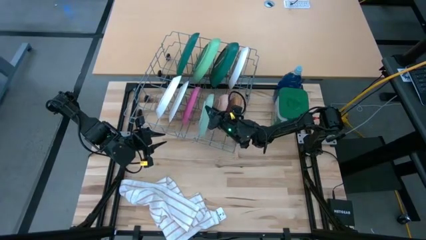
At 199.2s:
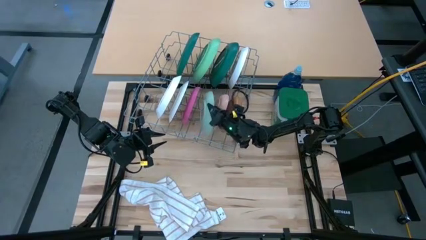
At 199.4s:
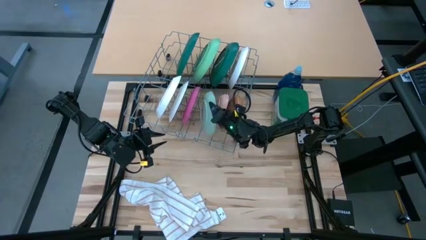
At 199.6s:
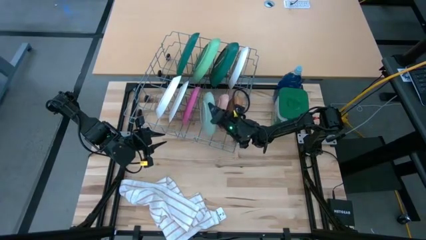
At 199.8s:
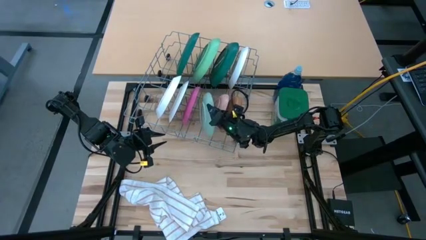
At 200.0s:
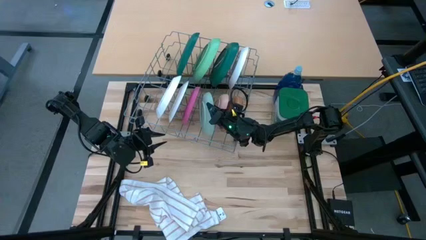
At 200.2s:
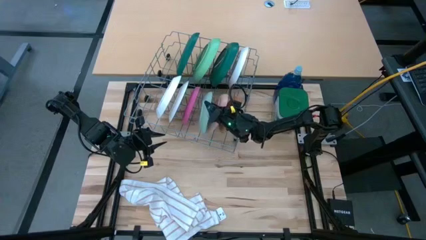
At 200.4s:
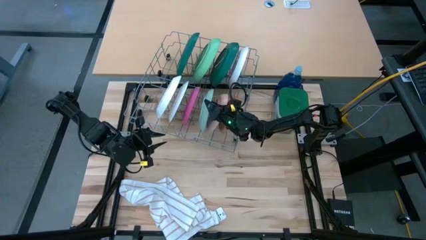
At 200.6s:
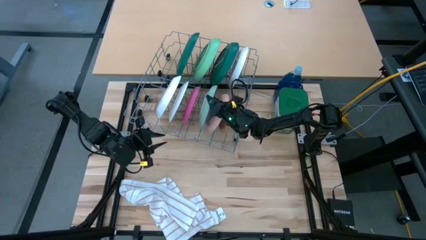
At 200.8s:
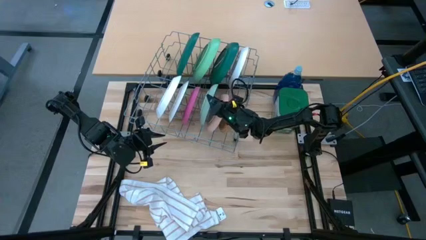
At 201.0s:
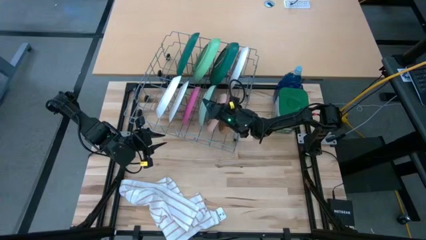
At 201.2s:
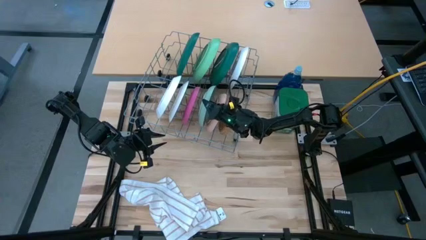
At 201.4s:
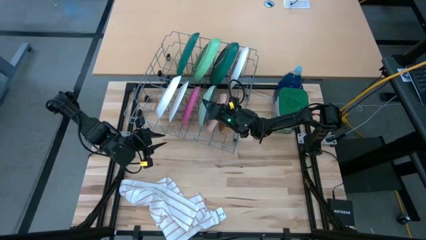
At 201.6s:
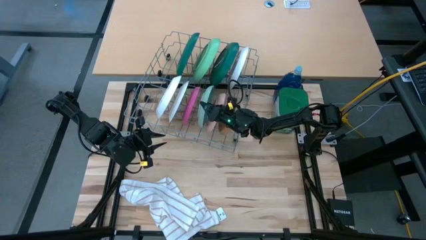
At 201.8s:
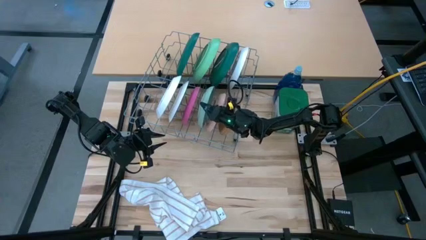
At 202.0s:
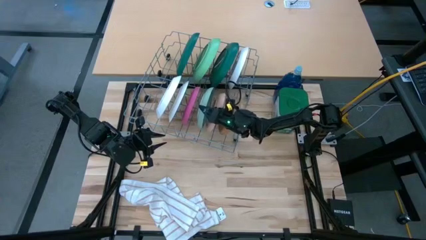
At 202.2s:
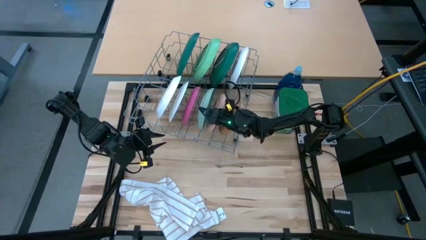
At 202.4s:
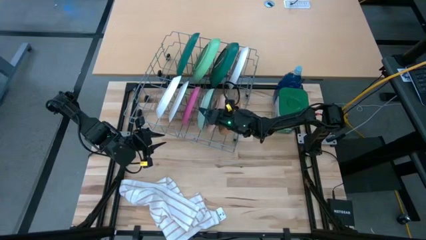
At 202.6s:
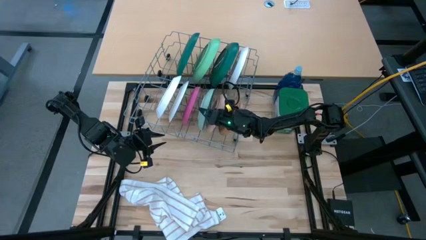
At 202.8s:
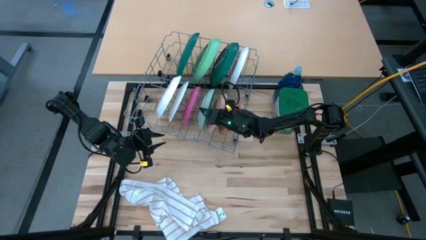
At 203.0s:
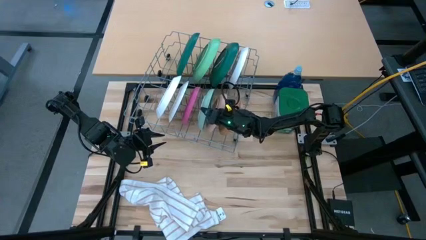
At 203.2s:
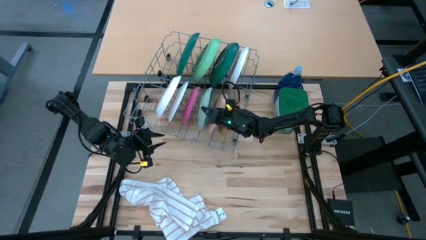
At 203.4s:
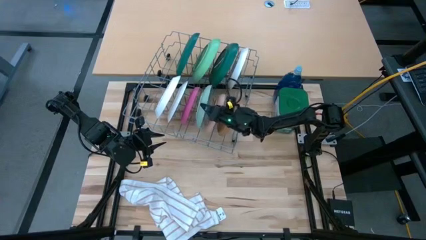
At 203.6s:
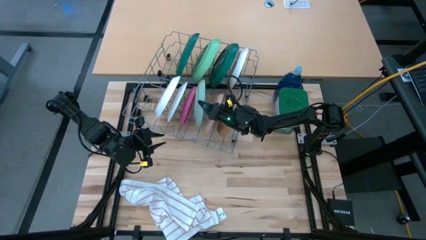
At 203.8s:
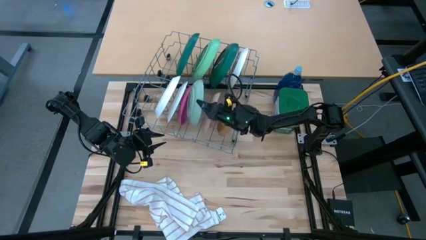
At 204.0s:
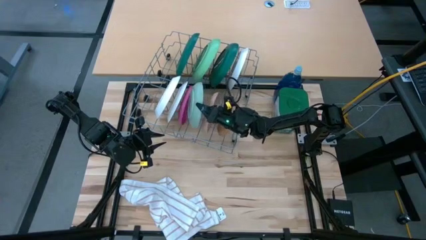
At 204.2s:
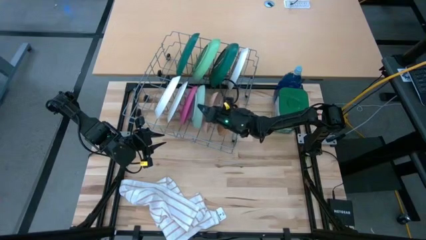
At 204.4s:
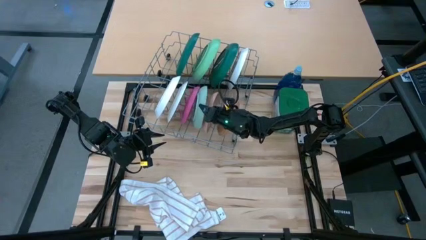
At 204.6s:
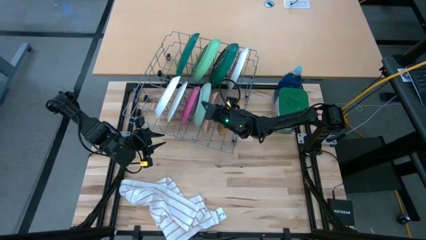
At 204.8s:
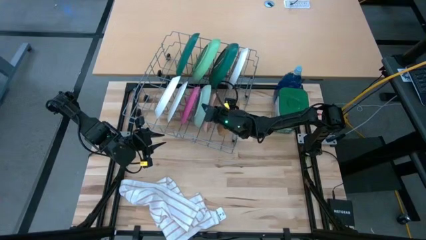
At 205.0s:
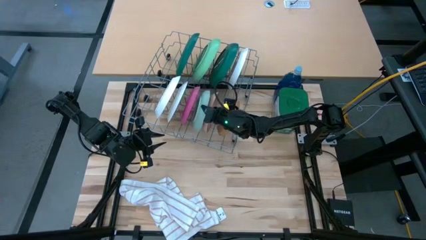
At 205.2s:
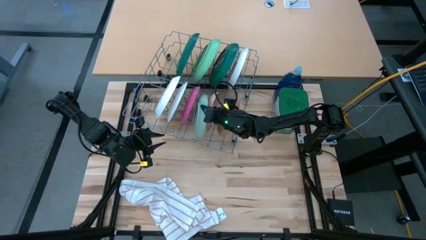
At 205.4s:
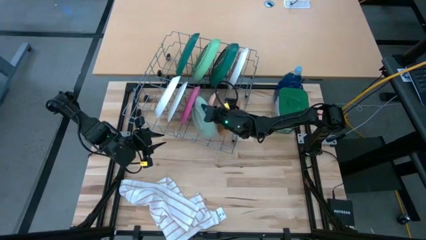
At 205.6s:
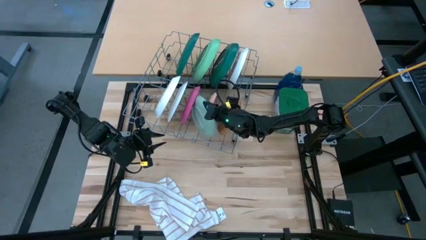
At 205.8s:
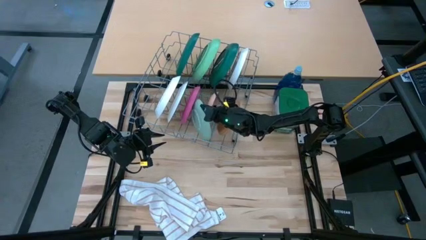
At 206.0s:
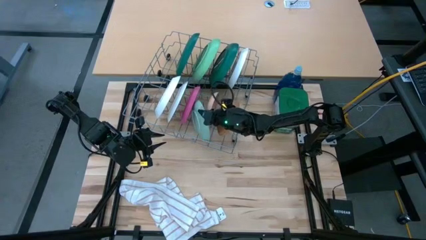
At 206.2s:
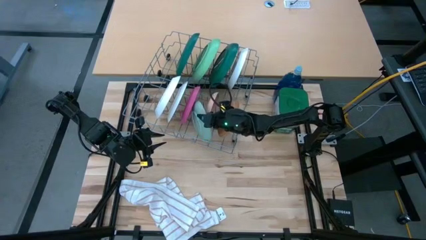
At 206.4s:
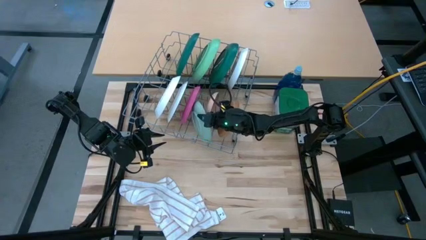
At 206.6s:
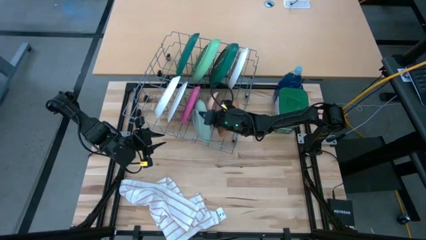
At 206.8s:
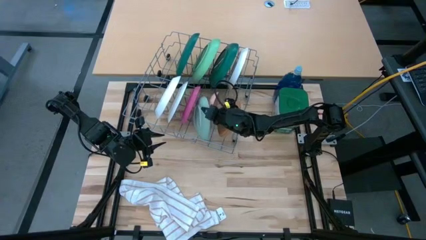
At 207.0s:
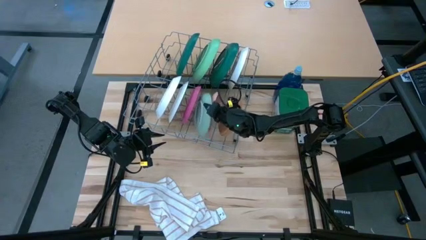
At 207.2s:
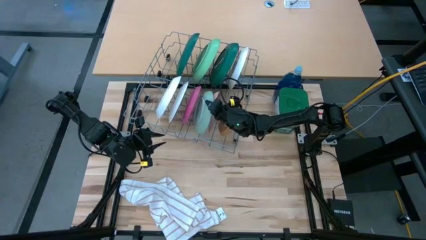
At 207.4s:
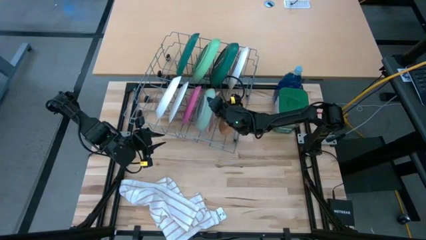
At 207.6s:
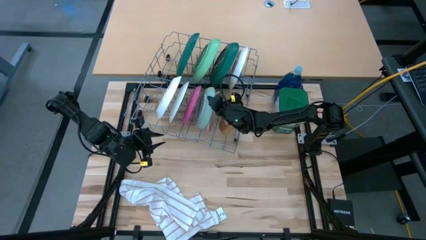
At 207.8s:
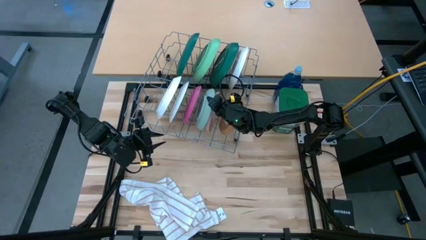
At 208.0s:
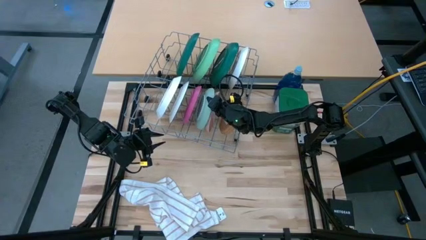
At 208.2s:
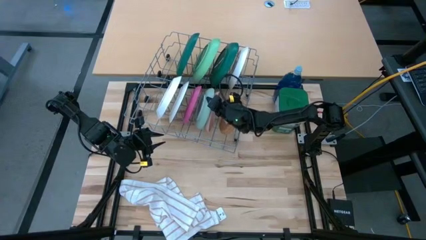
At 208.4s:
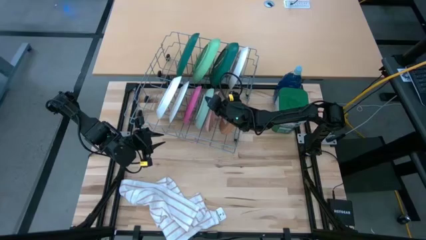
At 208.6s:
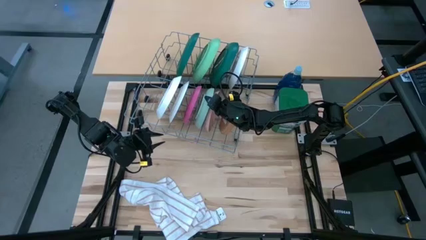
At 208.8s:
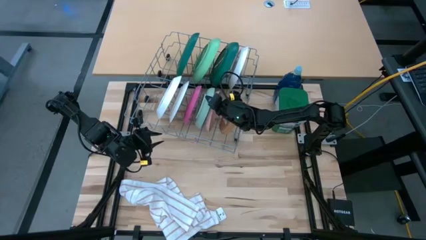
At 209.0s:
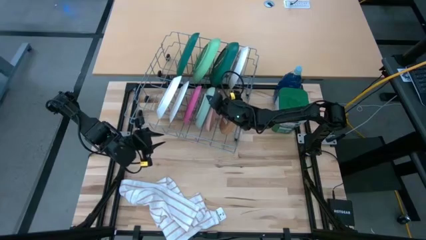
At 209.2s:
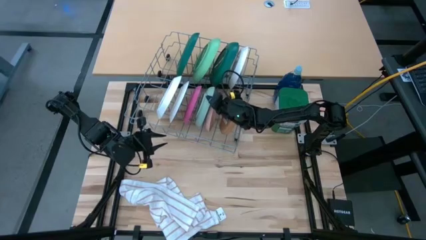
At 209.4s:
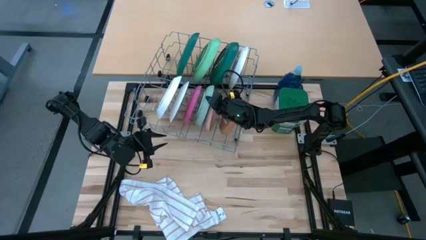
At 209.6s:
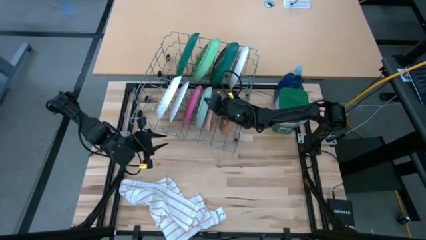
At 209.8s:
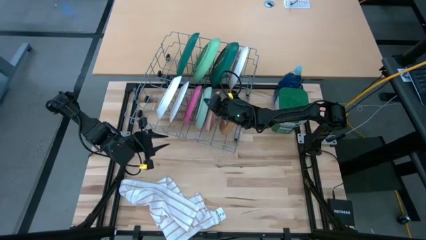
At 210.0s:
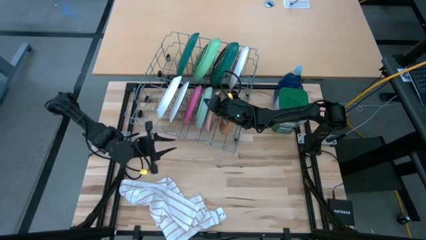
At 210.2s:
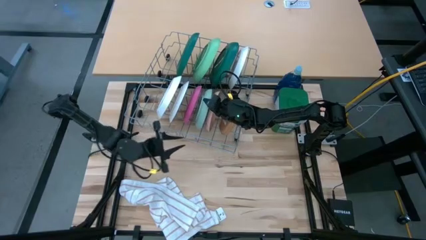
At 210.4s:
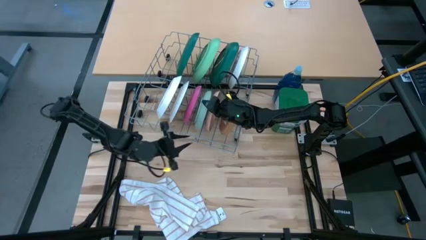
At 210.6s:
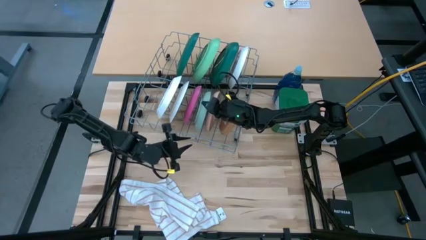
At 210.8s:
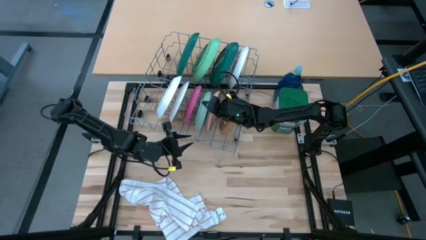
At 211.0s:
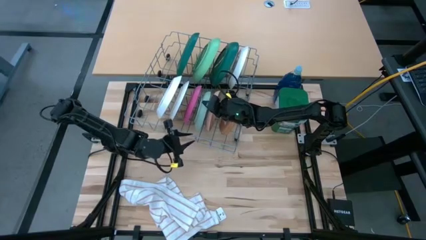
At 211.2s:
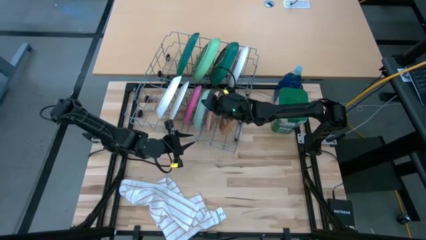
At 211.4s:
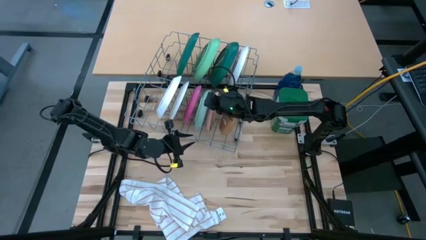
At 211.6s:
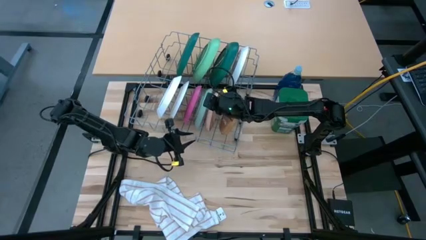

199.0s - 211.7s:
Task: Sort dishes
Put the light green plate in the dish rack

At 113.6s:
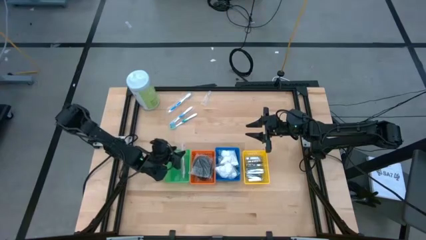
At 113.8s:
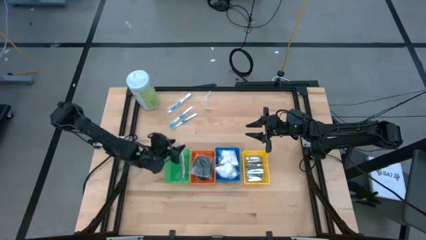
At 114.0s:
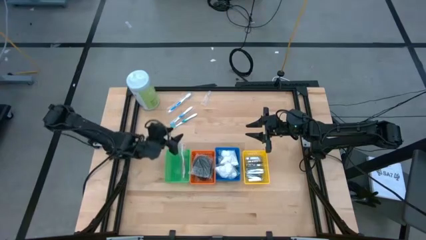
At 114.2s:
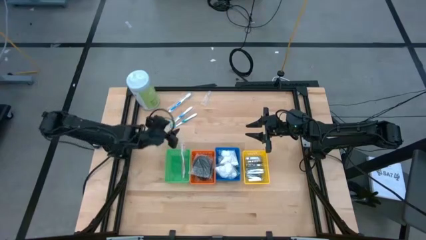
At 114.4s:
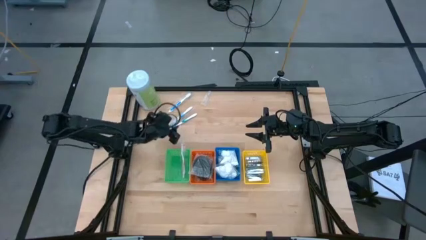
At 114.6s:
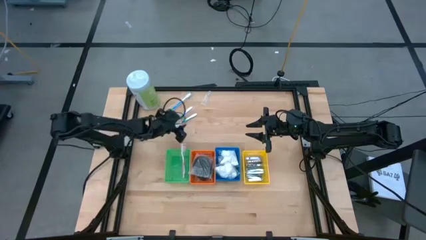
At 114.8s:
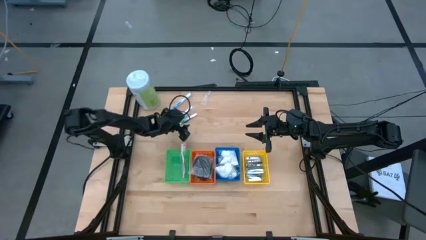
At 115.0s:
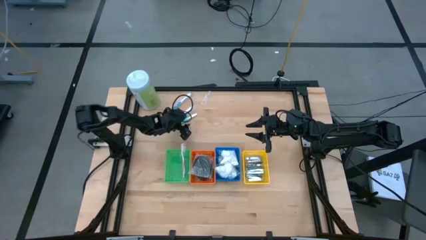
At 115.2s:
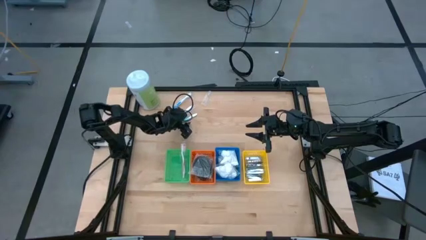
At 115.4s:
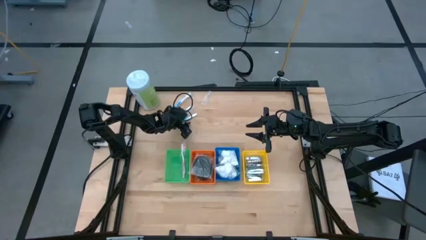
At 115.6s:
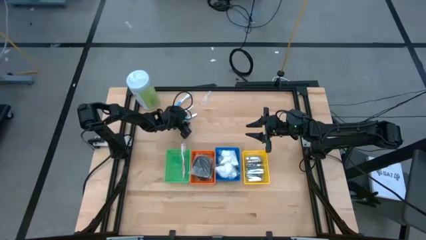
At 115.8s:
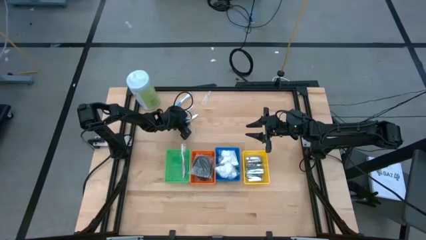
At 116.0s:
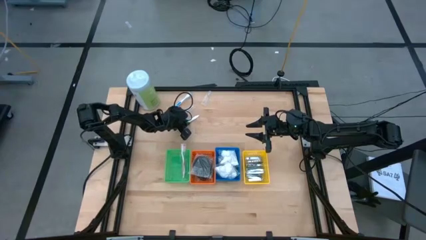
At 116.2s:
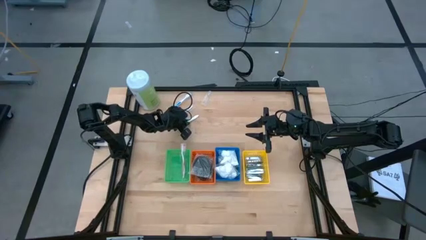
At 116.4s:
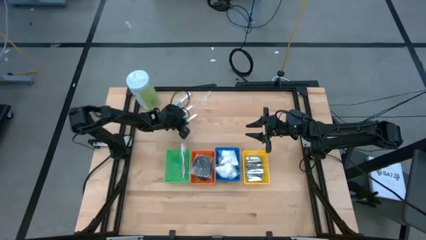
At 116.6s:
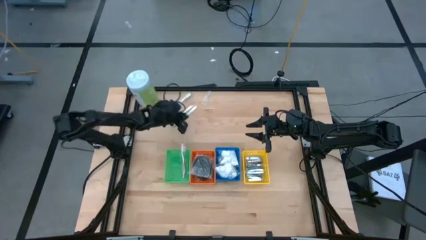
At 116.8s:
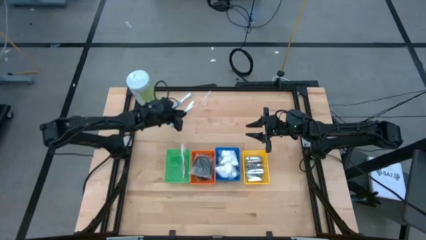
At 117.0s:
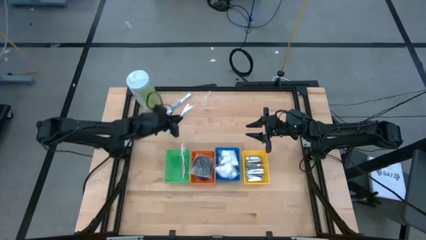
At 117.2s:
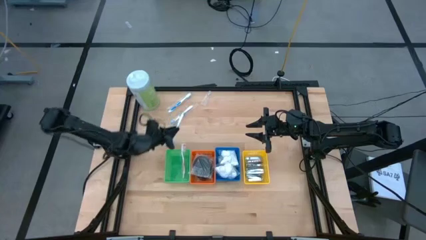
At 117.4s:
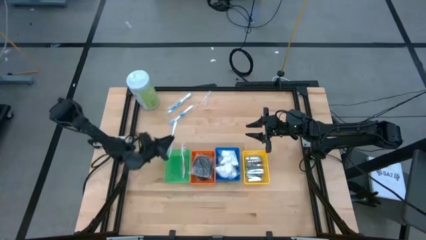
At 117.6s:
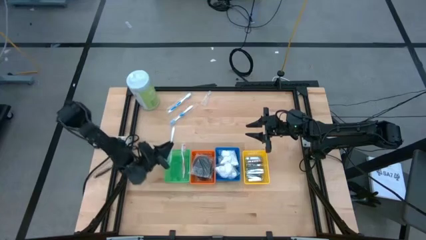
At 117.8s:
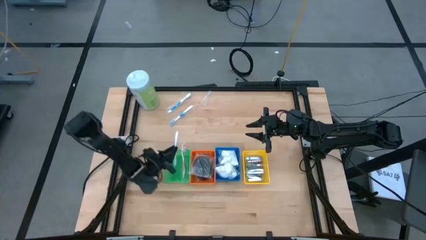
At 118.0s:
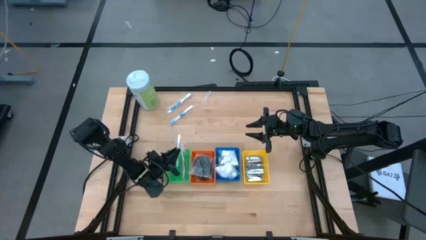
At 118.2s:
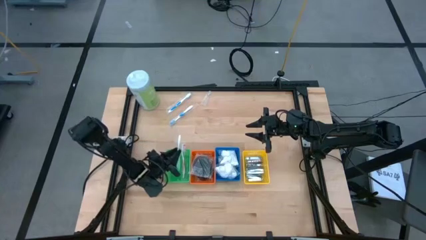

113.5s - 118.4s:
Task: Pick & Place Travel size toiletries
Put the blue toothbrush into the green basket
